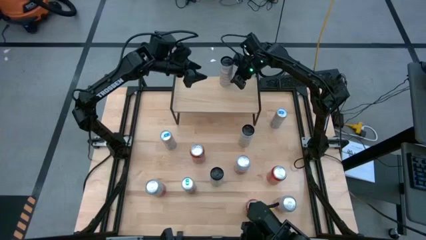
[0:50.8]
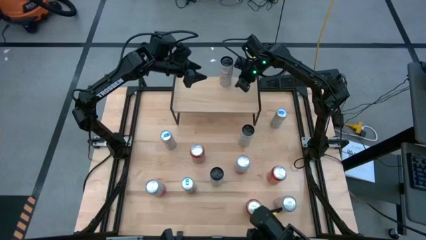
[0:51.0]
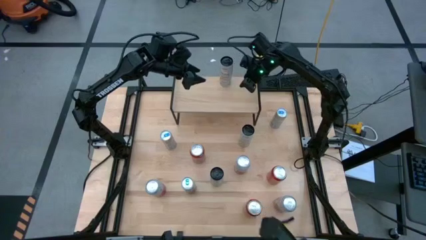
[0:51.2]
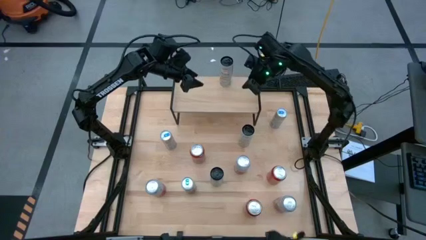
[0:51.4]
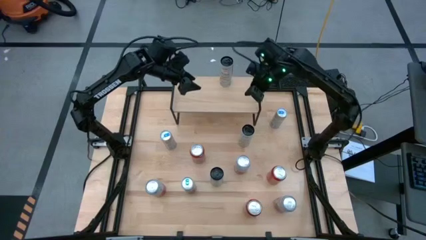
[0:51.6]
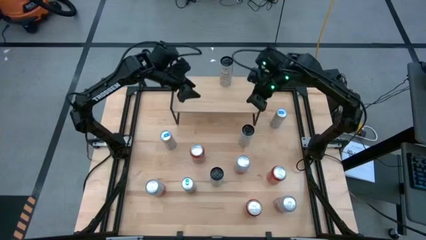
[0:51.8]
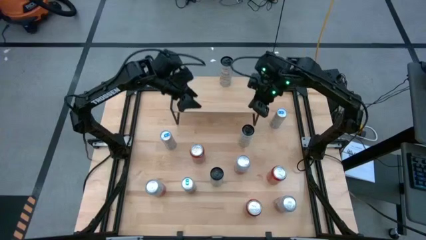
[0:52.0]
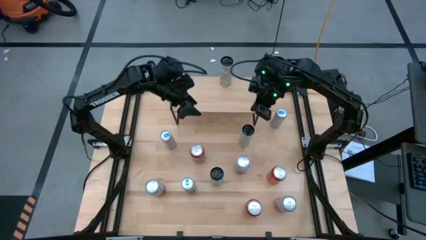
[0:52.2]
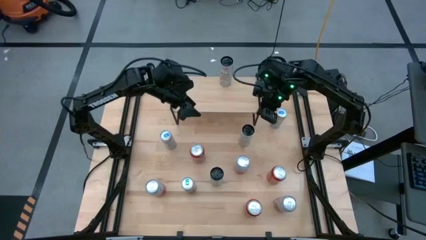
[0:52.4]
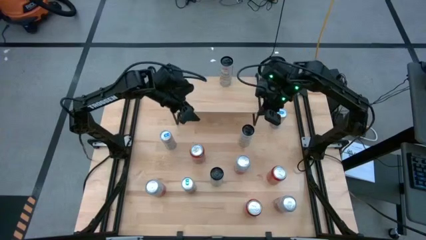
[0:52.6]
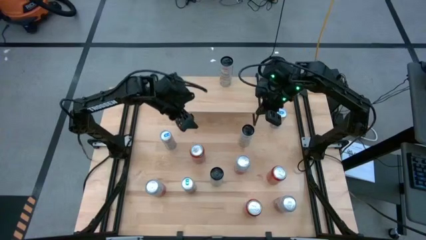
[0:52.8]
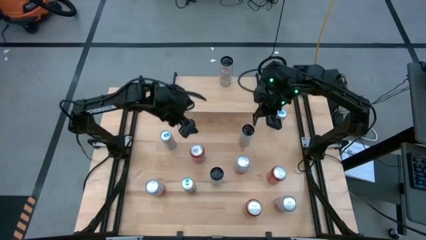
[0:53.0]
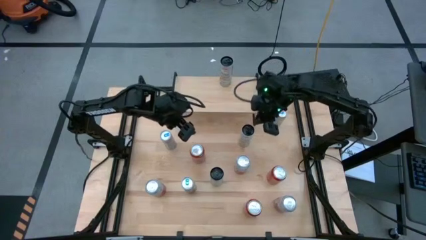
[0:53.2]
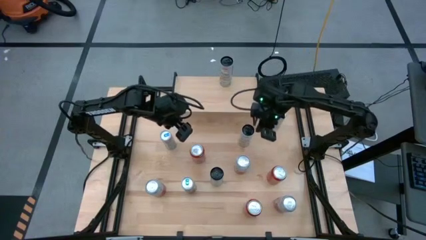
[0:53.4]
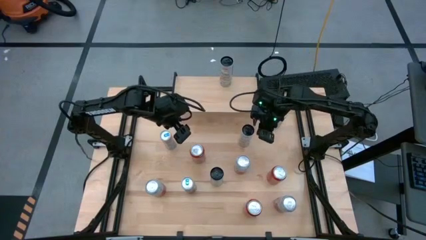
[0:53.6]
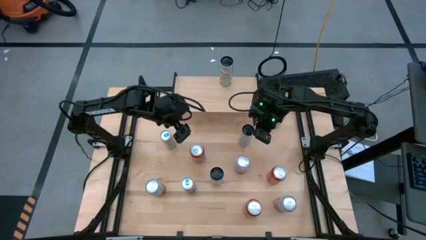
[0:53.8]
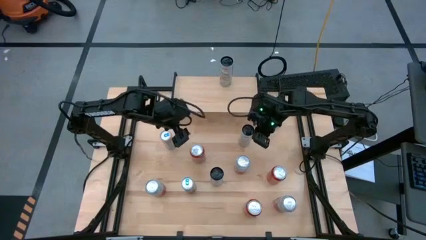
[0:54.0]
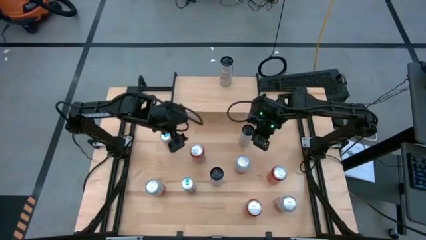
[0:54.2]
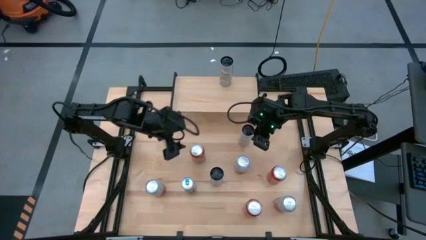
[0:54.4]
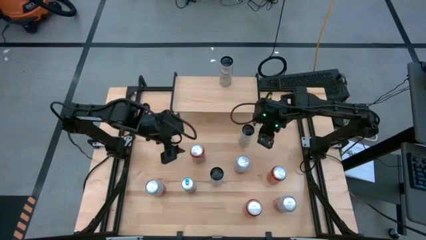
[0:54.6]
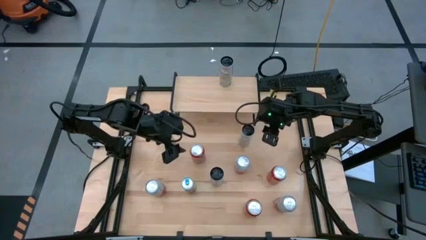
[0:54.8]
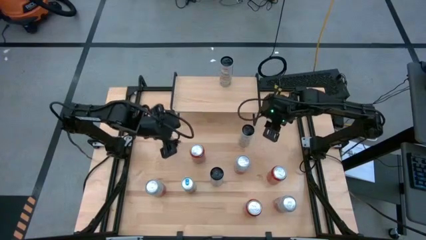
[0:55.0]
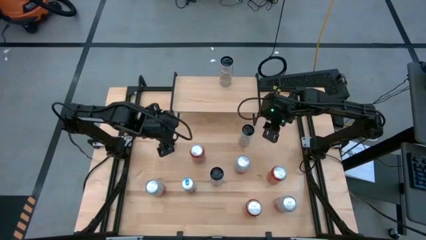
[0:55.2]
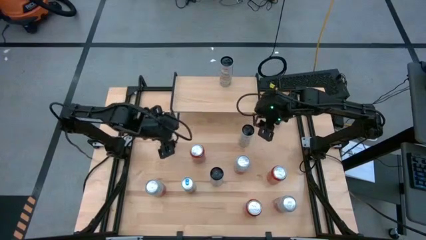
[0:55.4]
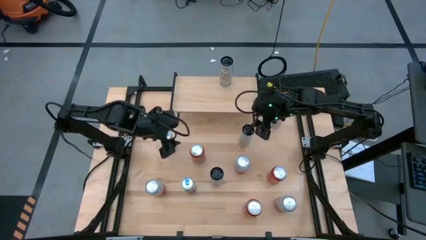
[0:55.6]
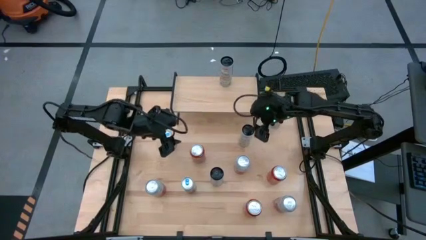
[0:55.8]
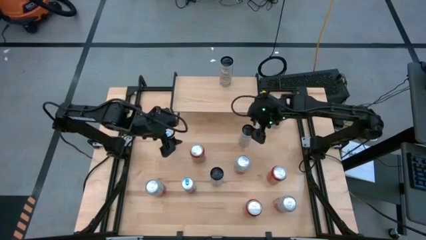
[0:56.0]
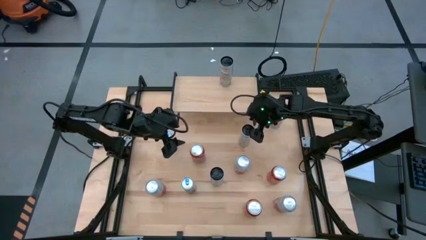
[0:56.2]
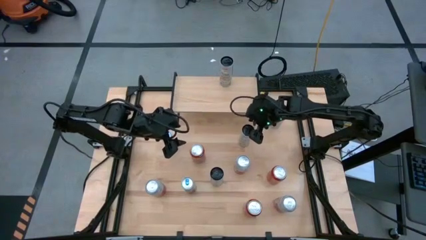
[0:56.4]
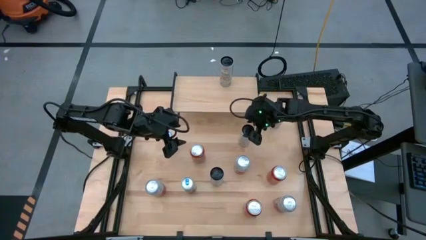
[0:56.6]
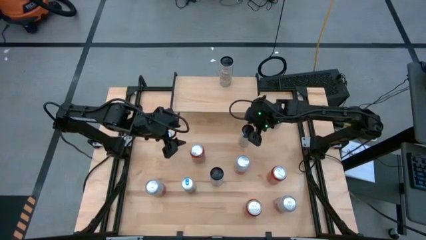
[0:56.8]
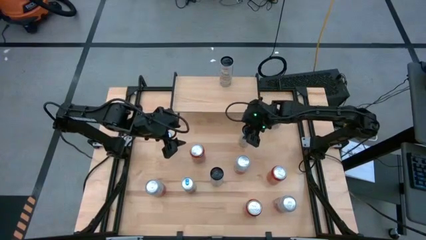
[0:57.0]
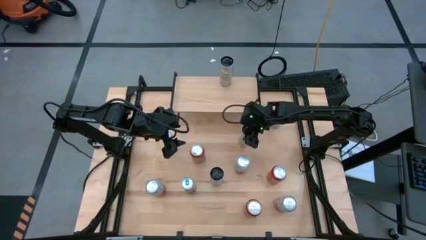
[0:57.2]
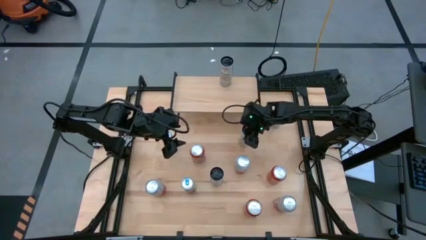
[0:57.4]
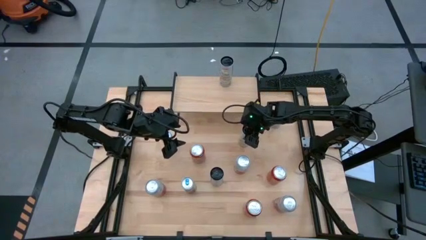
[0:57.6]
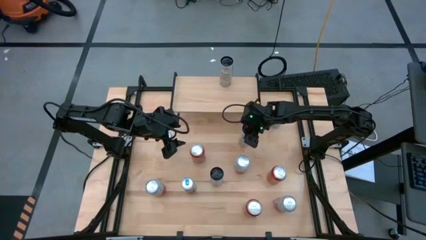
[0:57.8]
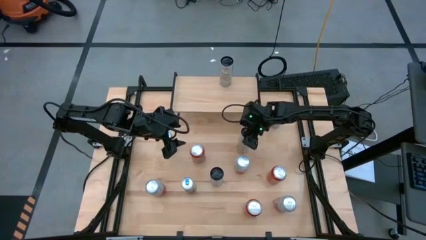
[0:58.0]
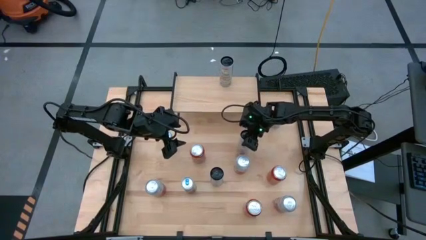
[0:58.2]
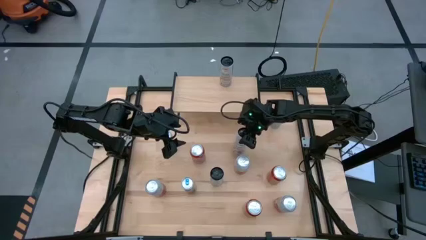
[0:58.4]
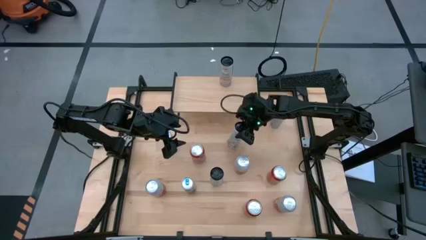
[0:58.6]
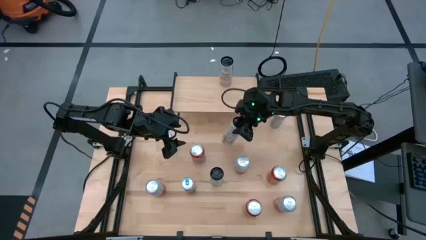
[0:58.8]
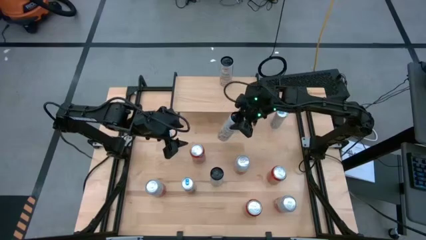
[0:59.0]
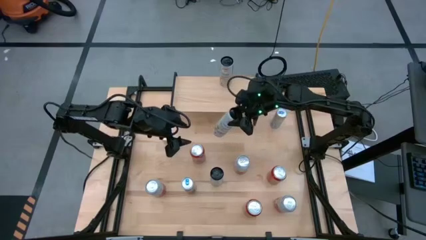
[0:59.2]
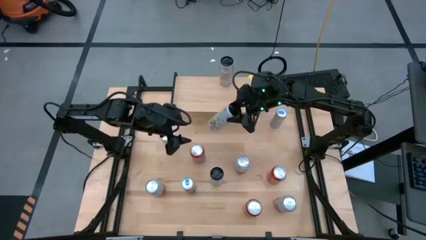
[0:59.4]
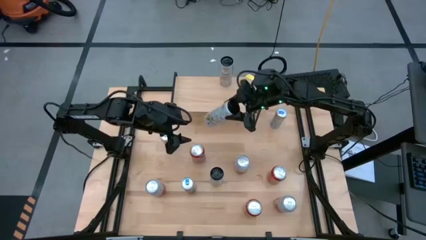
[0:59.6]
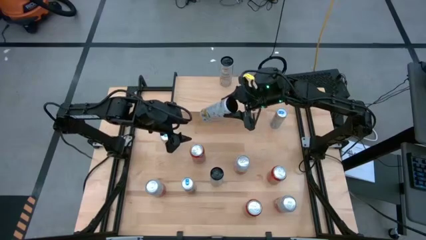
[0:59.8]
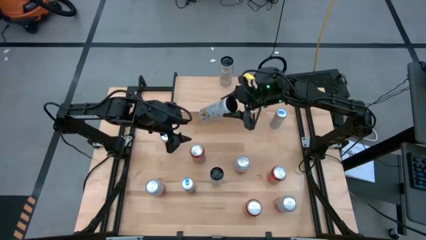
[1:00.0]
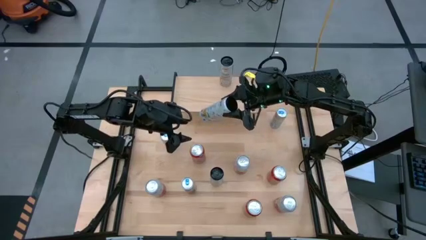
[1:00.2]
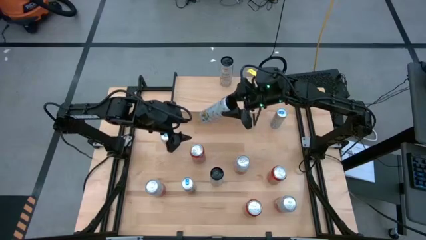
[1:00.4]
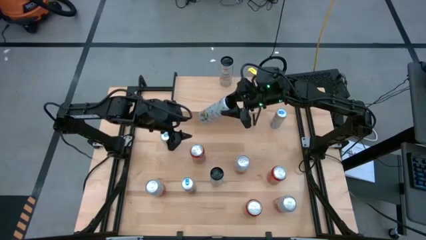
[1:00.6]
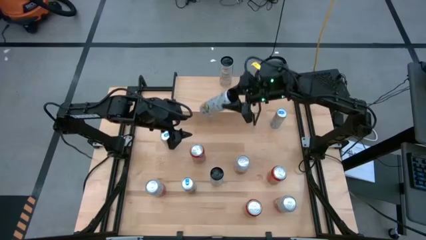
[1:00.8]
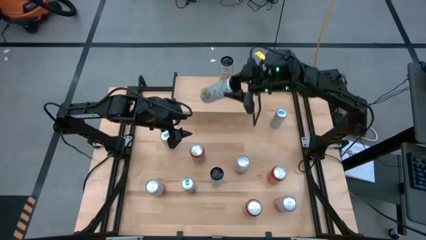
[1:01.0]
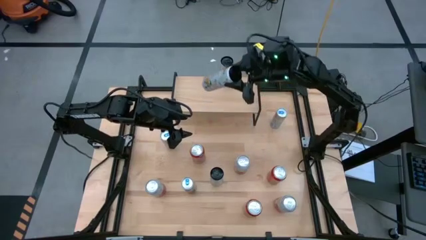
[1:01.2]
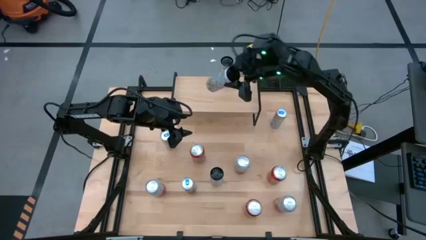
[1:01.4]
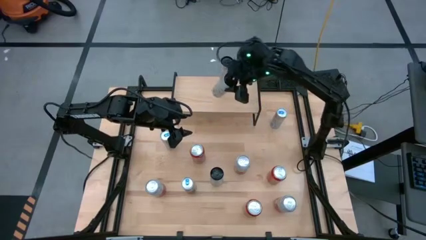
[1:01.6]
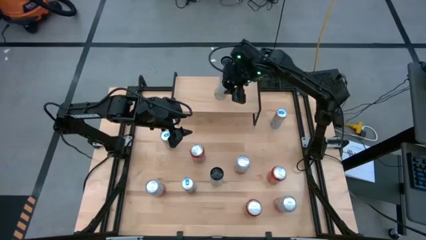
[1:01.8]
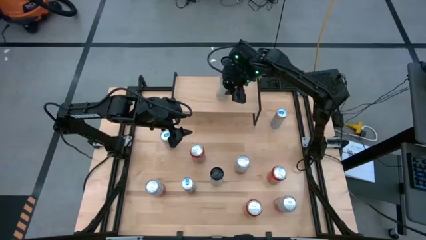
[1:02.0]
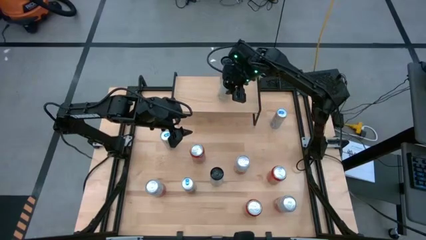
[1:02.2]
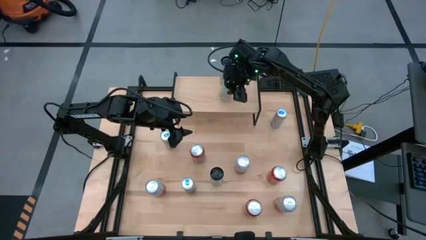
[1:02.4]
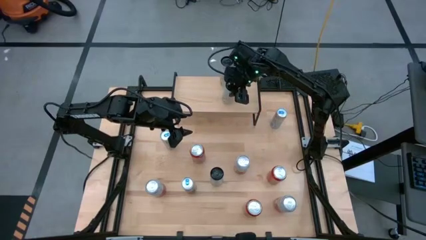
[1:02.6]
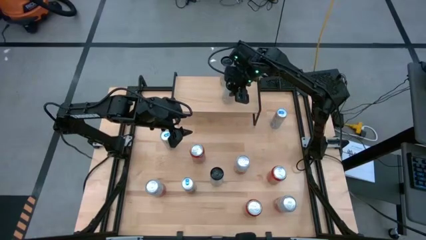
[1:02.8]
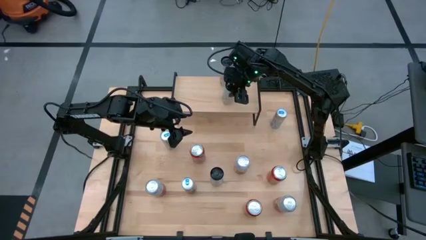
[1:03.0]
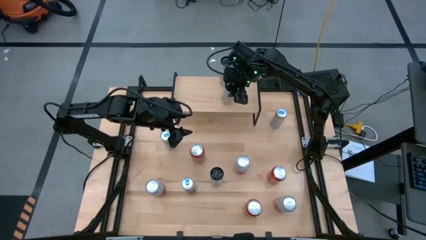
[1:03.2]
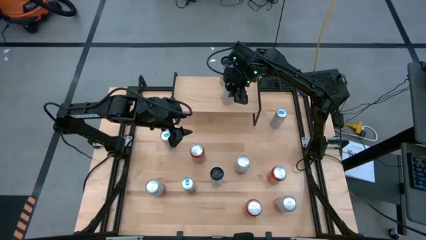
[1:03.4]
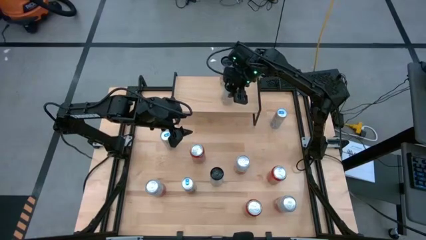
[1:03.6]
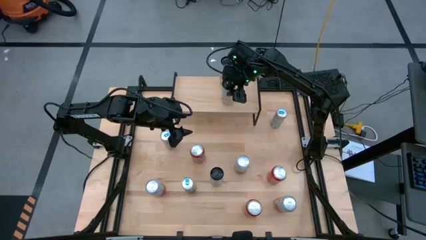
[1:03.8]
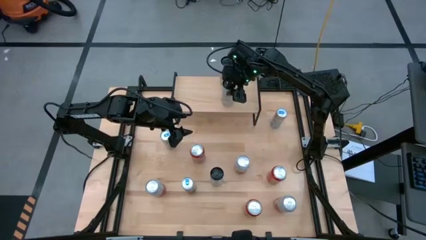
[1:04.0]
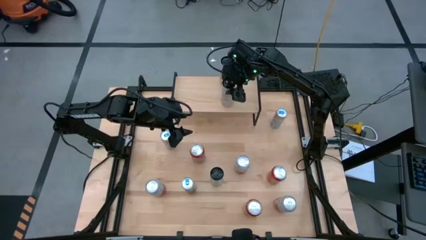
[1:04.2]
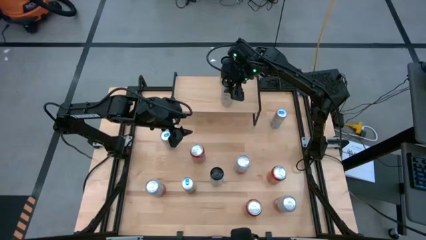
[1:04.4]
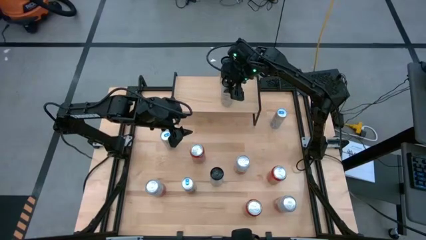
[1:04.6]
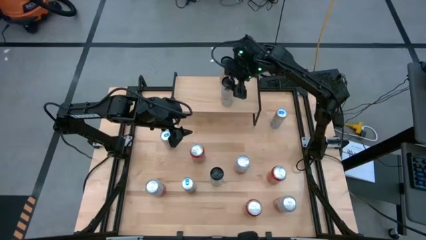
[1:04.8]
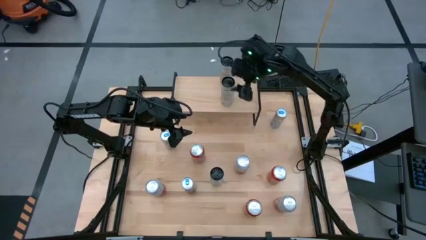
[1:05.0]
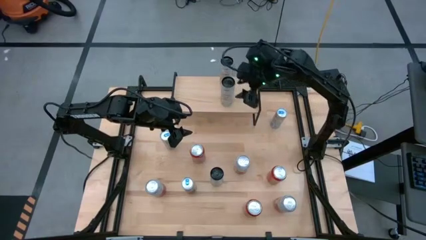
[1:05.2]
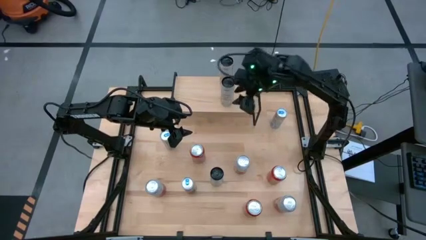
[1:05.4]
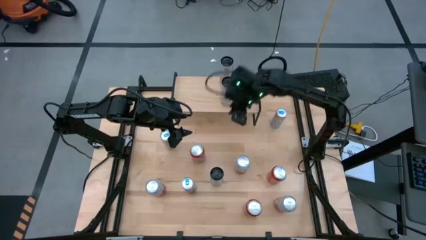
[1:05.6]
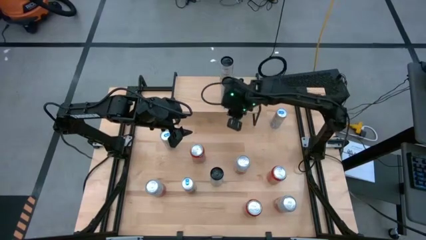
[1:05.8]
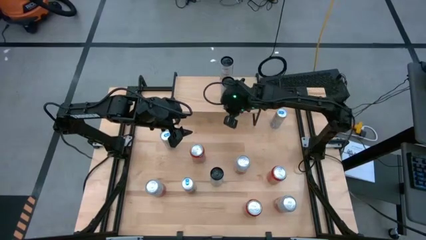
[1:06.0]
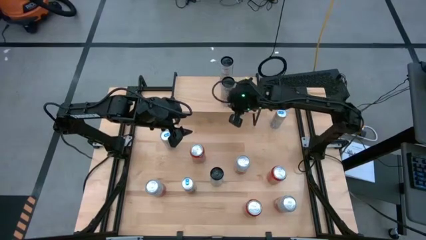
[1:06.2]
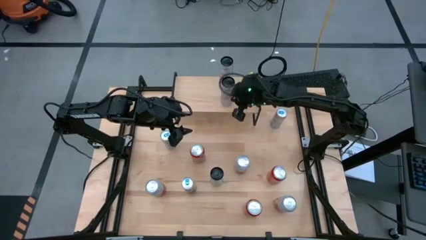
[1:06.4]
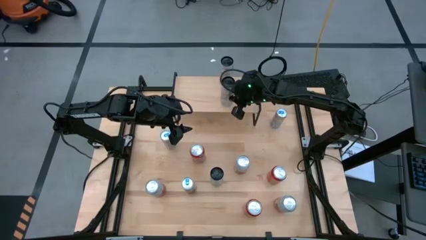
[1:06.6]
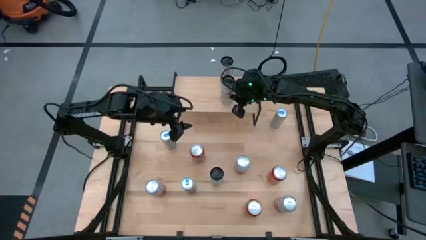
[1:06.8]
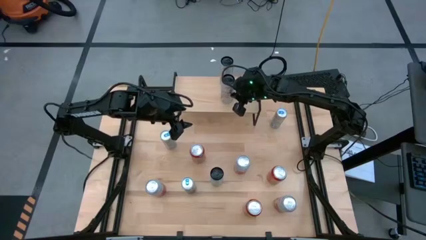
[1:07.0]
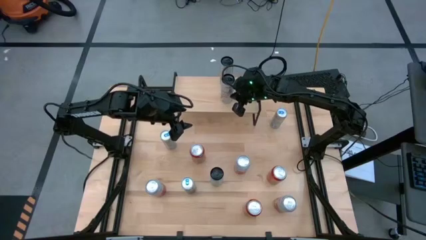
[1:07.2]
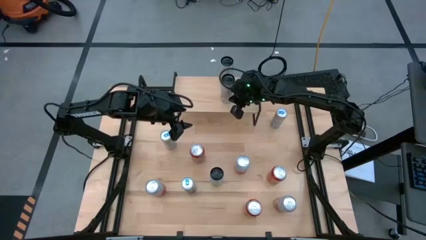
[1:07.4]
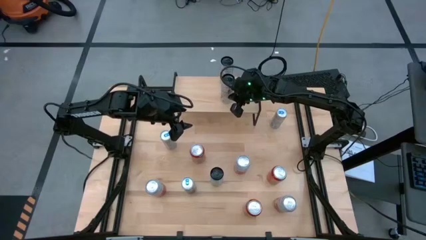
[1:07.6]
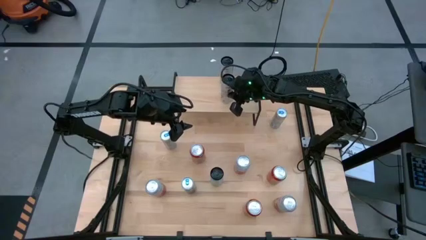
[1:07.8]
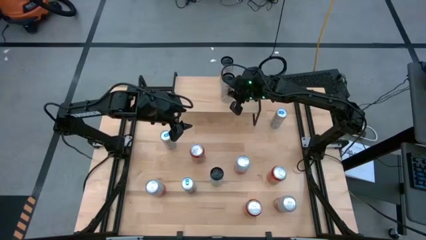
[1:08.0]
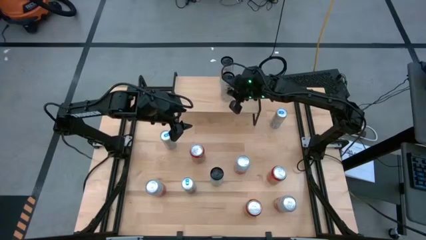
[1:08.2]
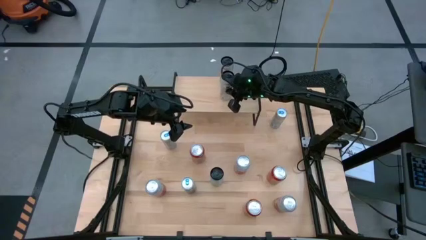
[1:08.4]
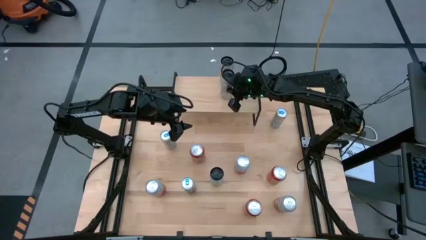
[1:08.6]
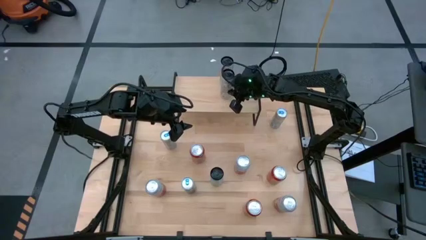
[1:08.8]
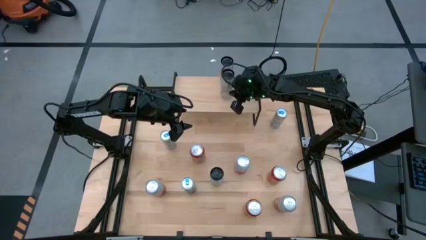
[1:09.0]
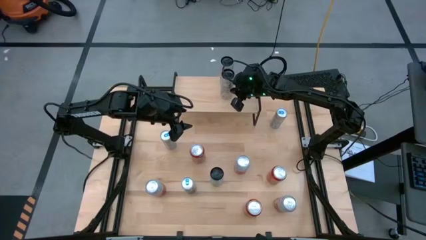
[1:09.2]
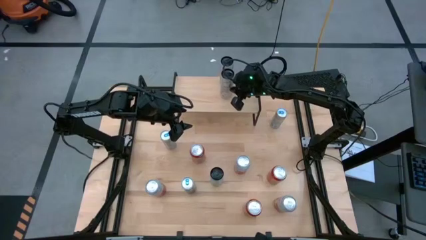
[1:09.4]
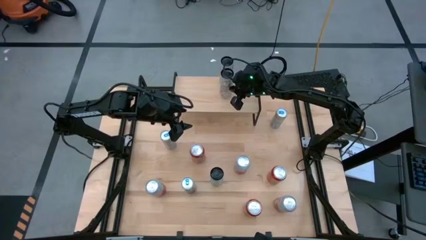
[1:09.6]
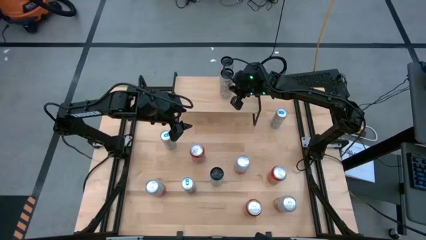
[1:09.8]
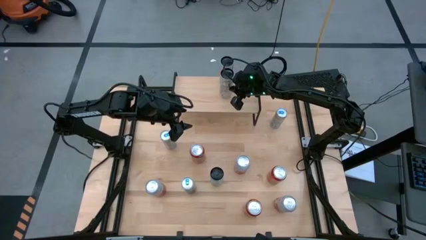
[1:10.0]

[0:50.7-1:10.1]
Task: Place canned beverage on shelf
Put the middle right white-yellow soda can aligned with the other white-yellow can on the shelf
